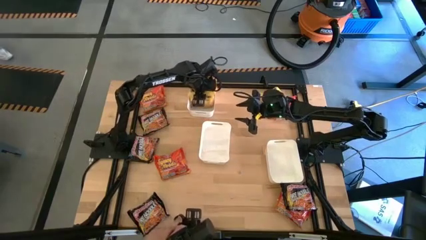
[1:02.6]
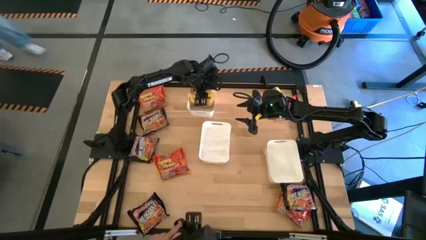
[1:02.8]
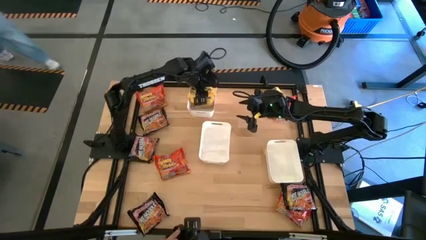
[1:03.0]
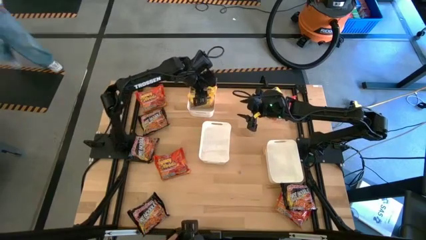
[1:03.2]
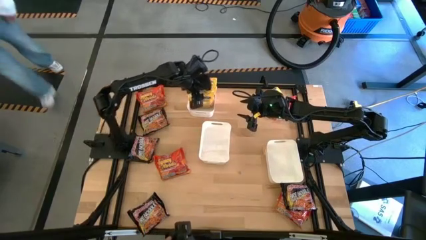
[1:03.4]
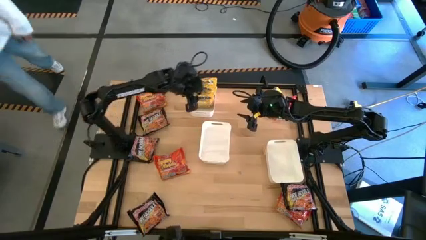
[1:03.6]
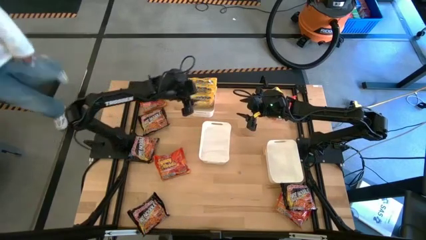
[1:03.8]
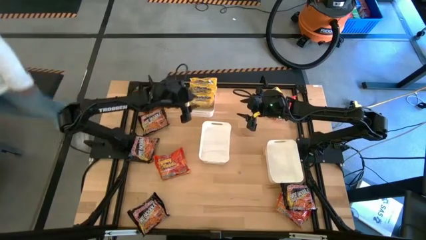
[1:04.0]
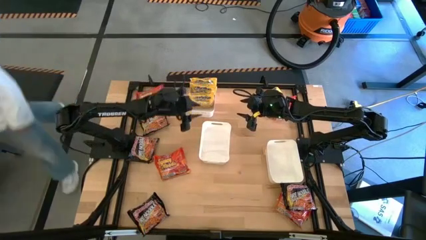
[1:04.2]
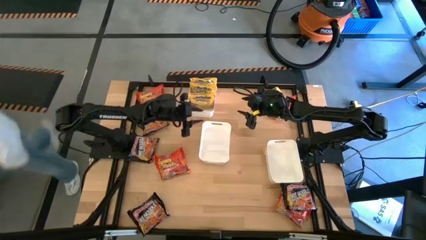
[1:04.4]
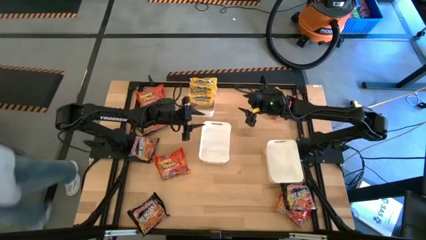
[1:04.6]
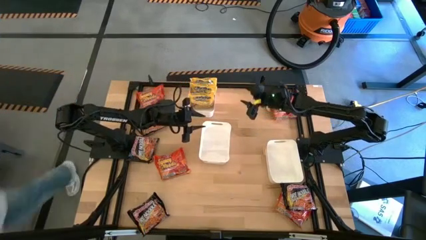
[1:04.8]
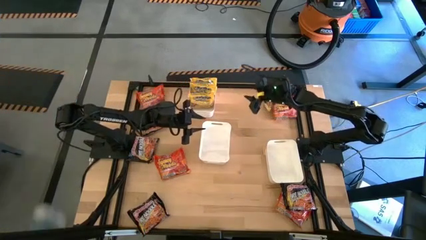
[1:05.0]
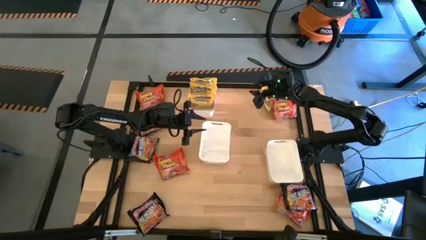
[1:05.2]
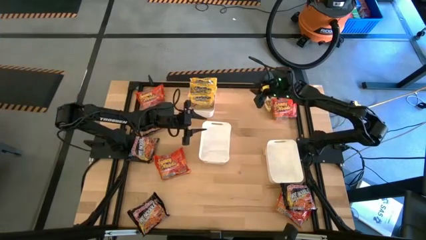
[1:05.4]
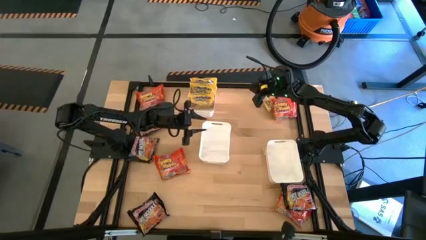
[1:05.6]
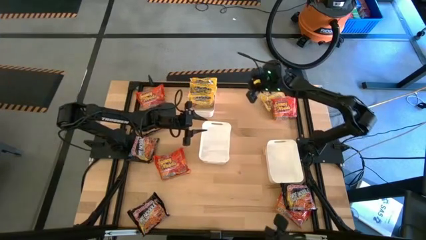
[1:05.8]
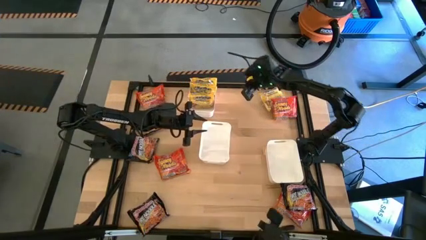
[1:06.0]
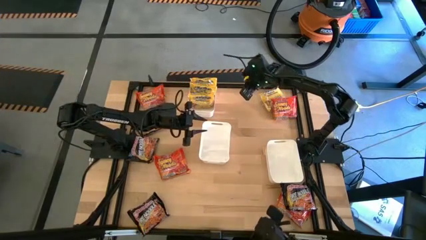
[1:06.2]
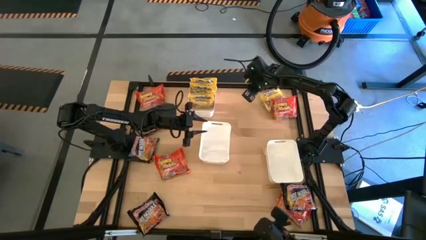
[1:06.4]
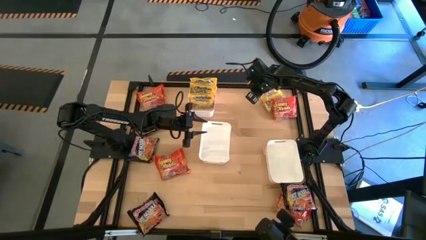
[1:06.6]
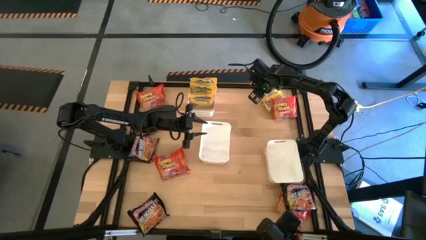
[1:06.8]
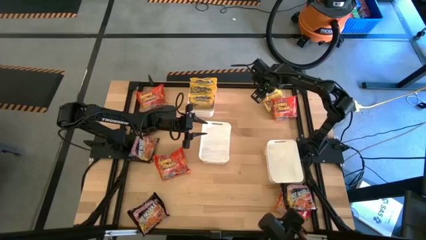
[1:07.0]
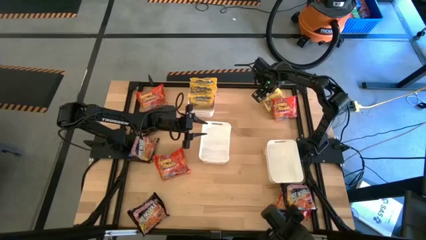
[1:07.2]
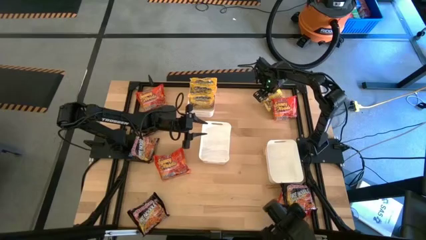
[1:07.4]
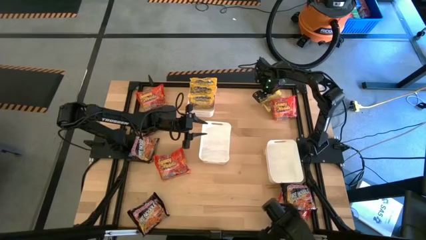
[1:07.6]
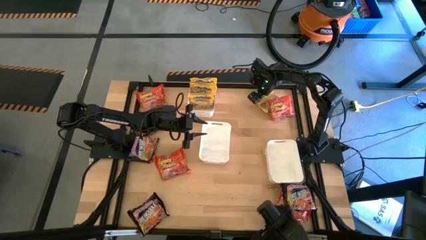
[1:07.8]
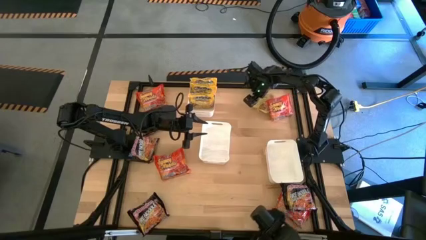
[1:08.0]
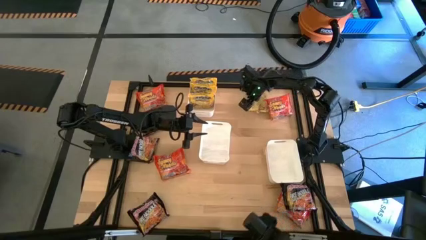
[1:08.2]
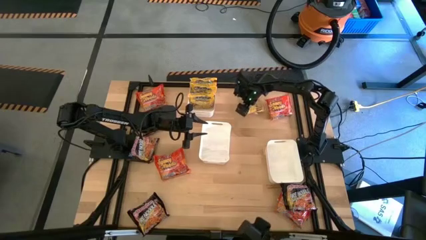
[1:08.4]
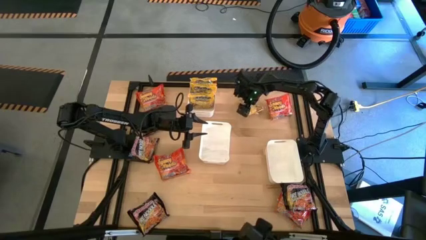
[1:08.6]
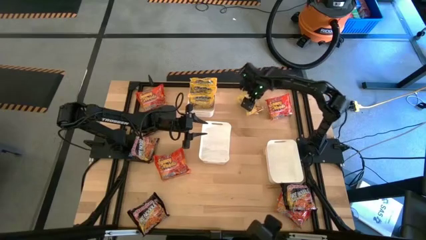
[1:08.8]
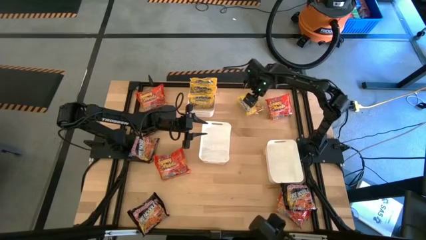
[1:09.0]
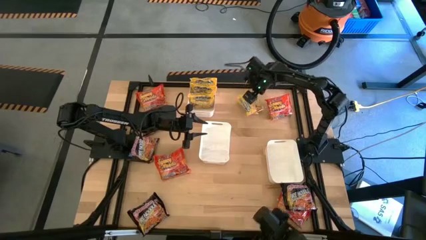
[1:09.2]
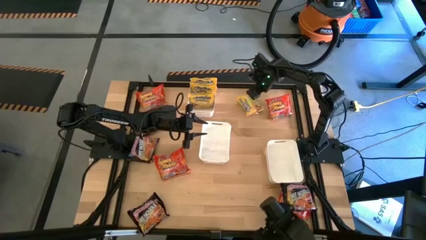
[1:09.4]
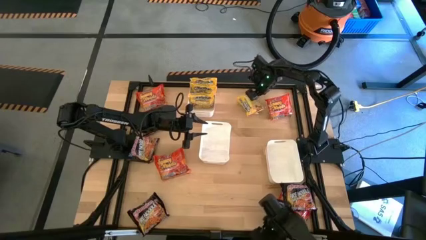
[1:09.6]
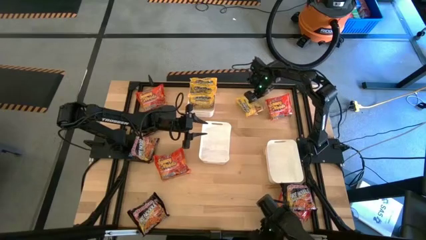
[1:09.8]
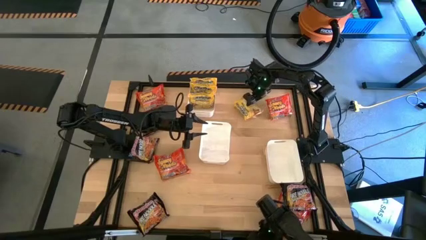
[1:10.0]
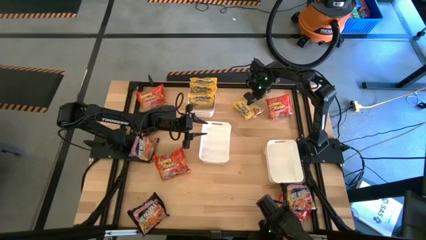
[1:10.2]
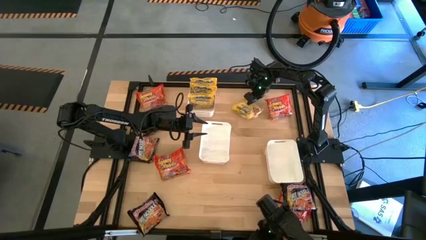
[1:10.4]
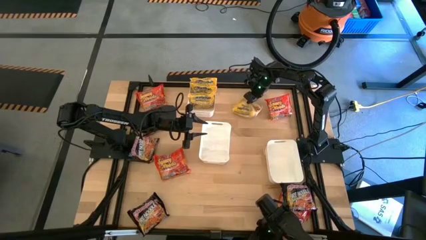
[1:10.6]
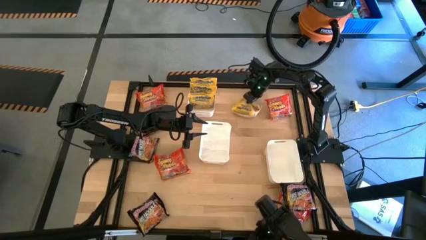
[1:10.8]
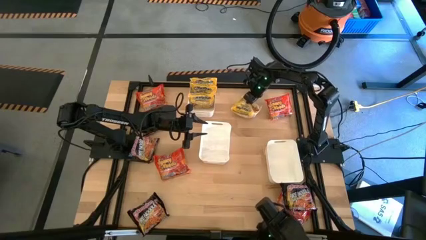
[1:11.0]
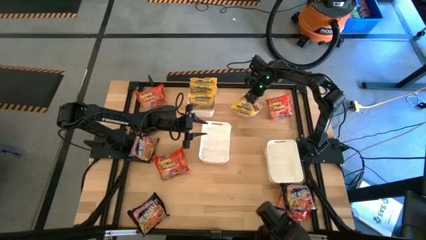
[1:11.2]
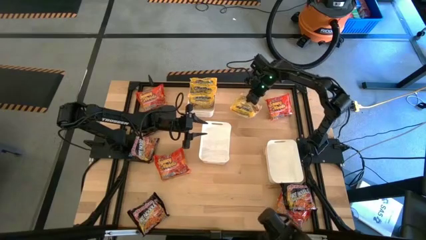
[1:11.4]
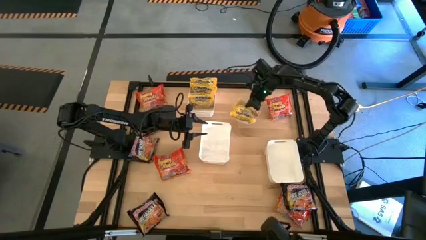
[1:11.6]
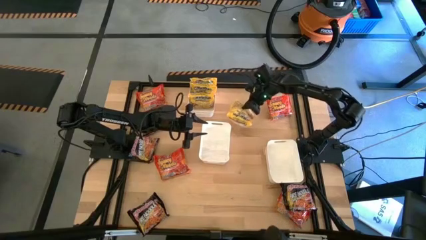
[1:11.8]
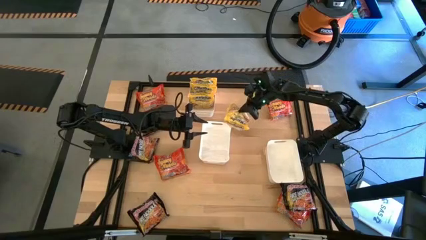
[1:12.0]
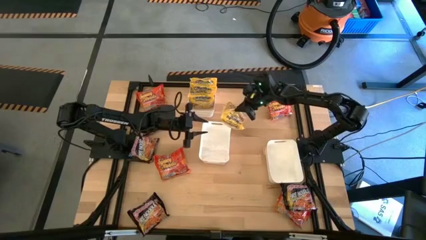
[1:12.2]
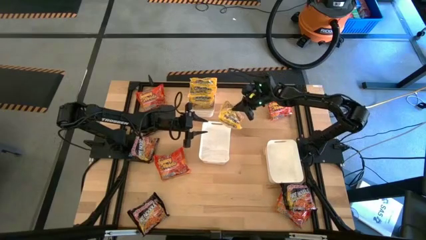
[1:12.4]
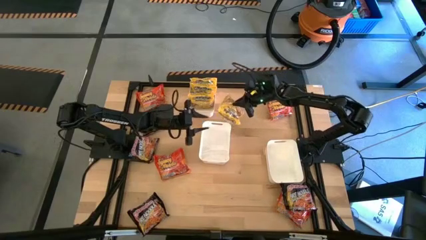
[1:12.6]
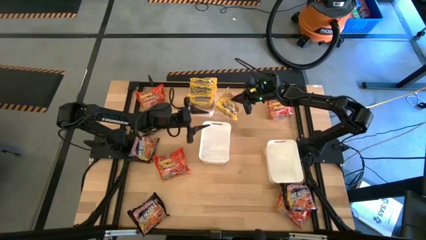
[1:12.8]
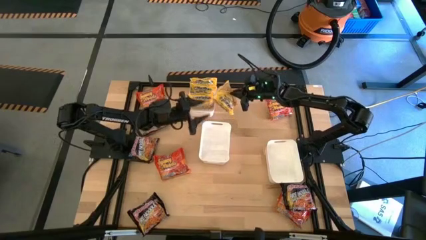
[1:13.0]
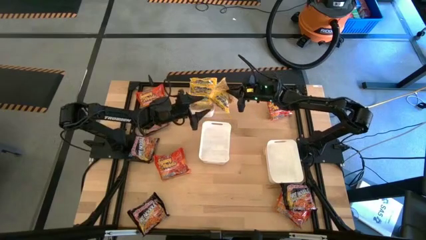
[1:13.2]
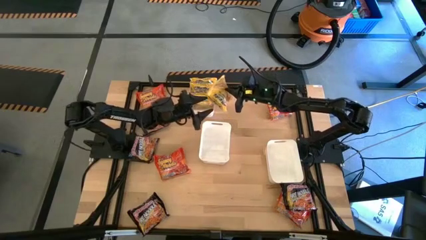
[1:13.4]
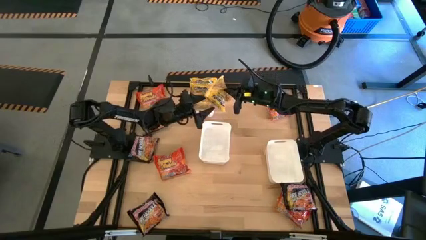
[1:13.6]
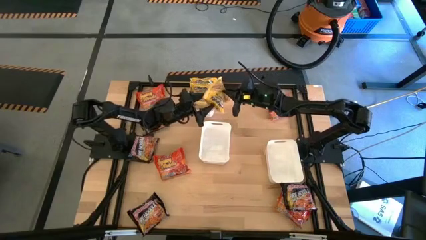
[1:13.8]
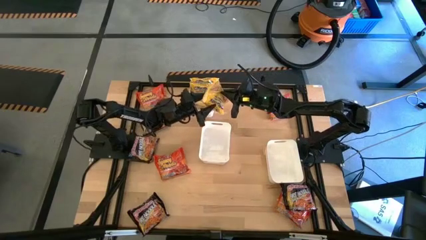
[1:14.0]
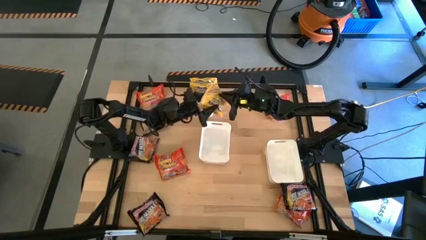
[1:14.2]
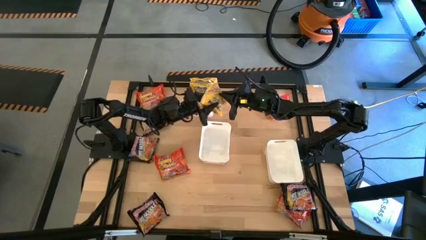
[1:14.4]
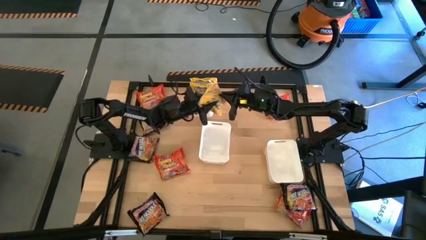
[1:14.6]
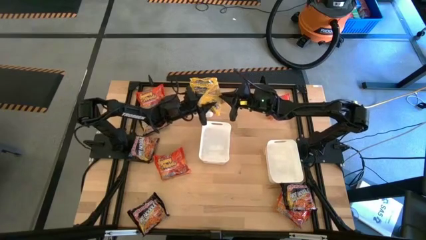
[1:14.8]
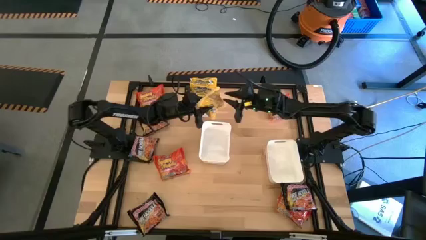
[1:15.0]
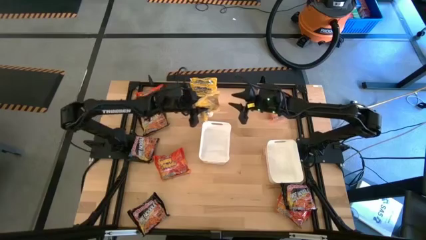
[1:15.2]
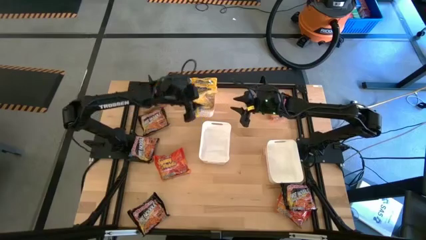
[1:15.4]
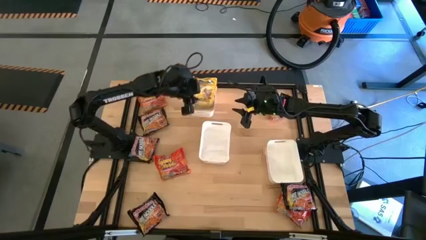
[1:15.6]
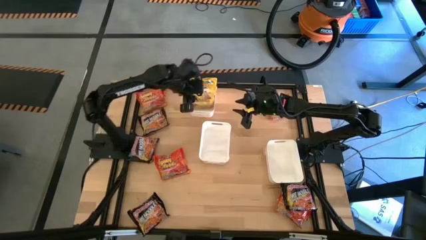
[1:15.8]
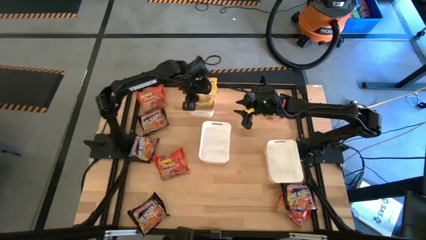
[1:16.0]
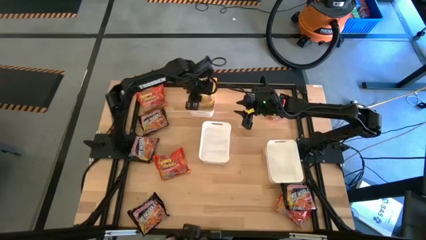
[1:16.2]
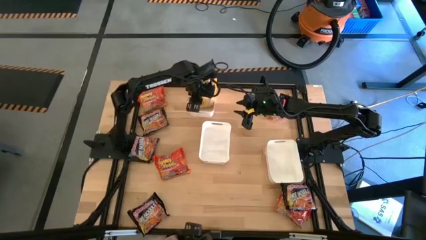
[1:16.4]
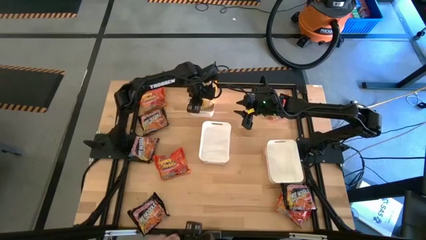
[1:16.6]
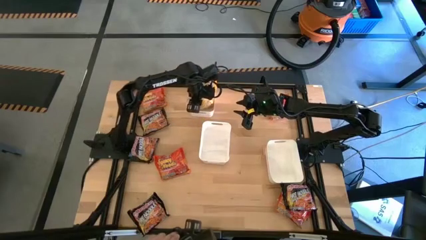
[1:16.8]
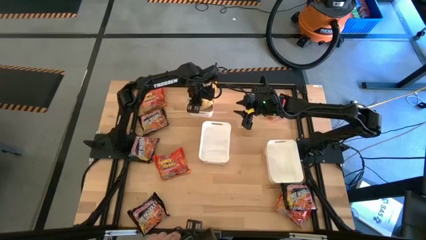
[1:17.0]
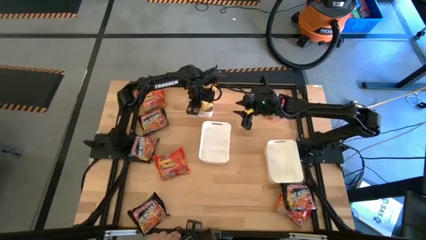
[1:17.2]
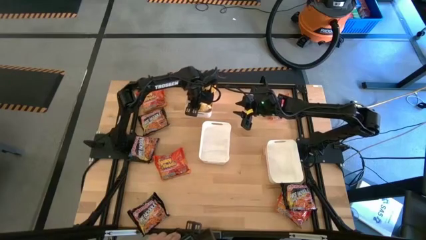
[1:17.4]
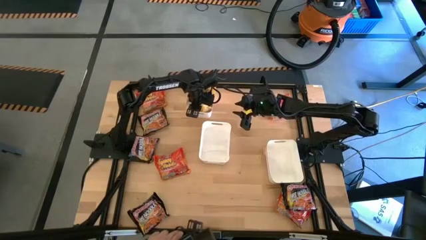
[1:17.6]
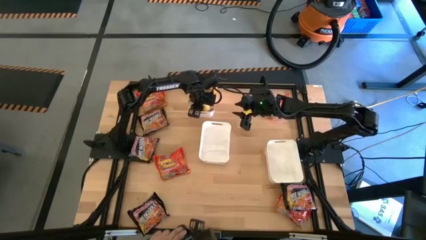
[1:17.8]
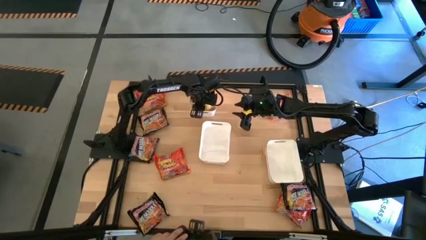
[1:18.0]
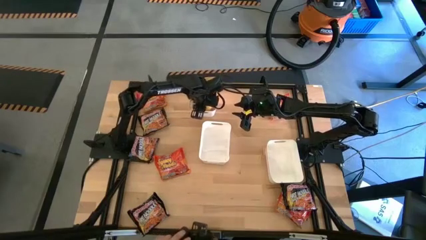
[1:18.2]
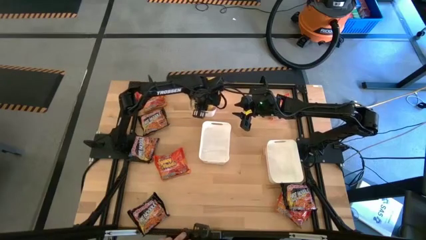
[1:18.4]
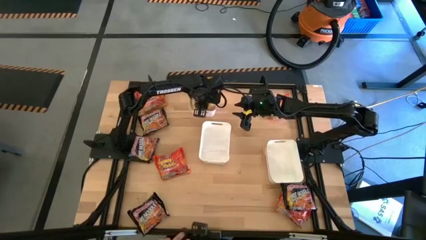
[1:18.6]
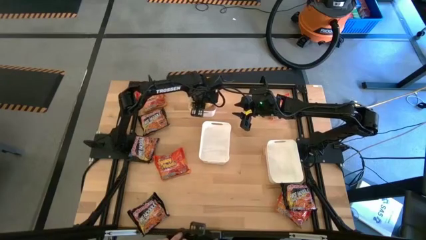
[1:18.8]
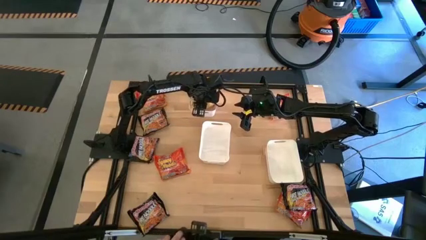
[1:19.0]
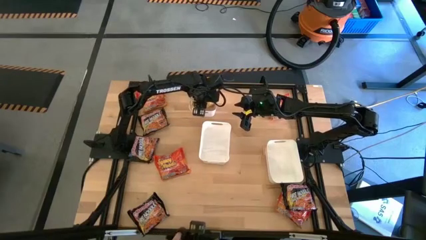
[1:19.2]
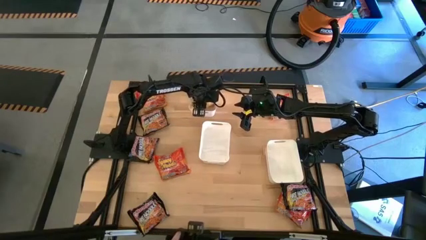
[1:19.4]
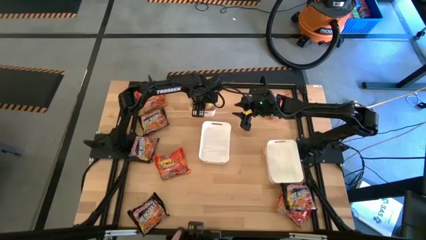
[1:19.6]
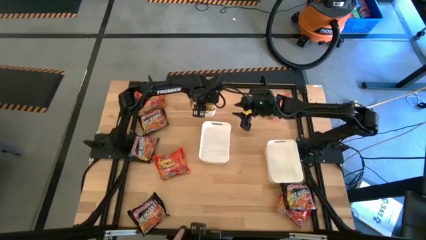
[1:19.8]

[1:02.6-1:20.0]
Task: Sort Maruchan noodles
Put the yellow noodle pack into the top white bin
